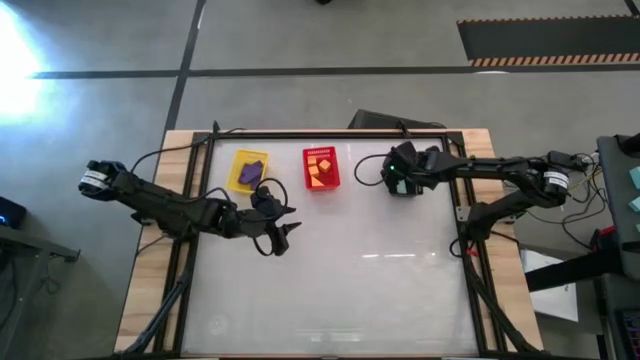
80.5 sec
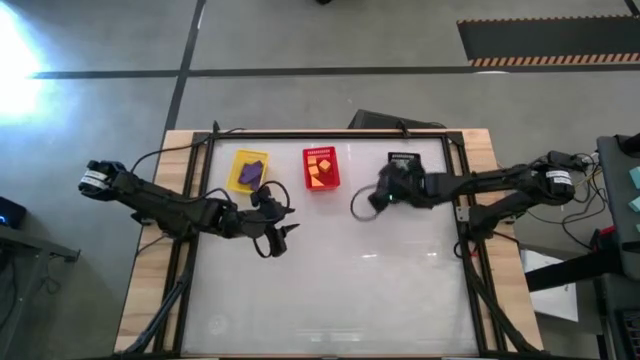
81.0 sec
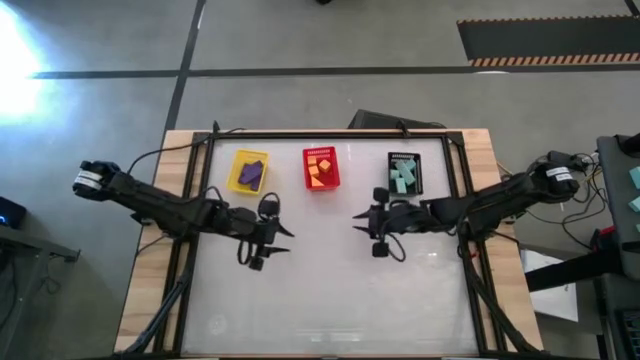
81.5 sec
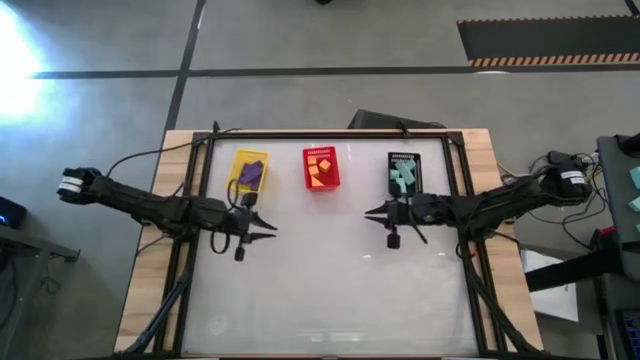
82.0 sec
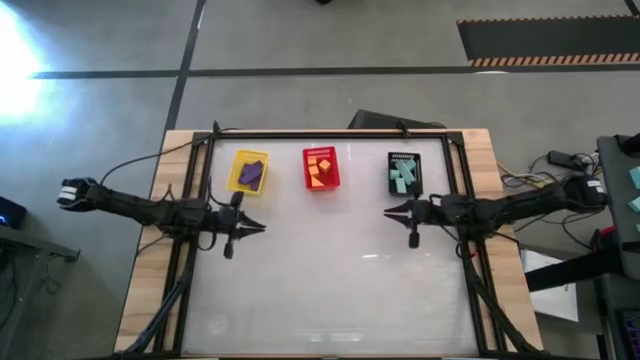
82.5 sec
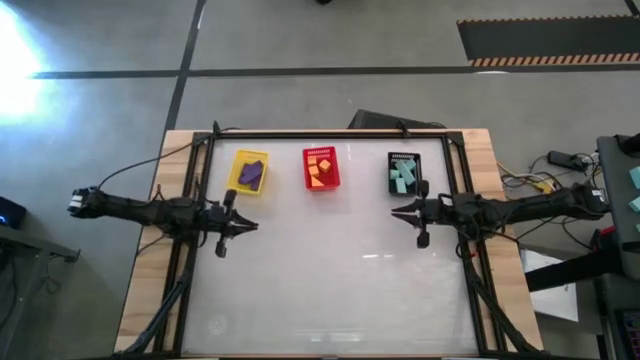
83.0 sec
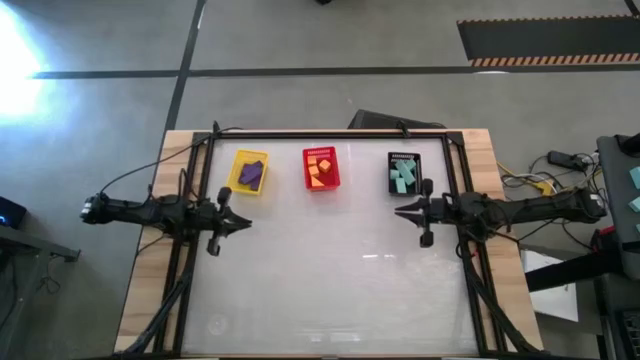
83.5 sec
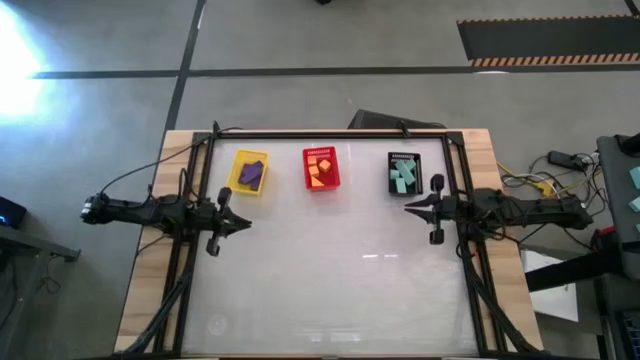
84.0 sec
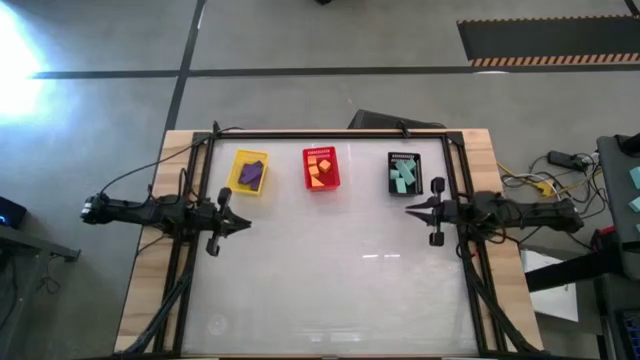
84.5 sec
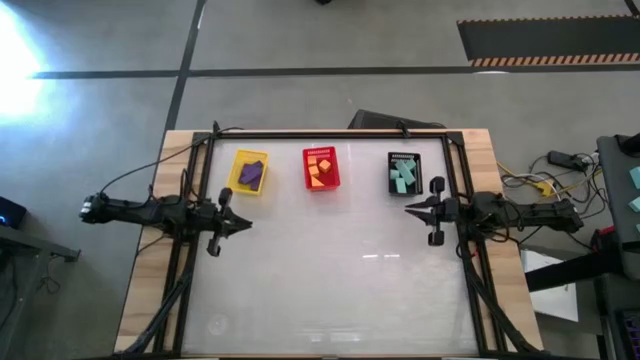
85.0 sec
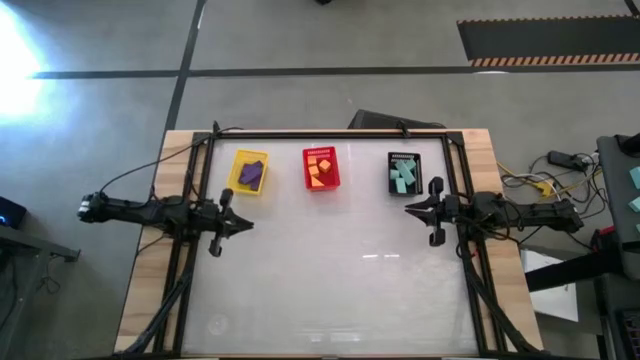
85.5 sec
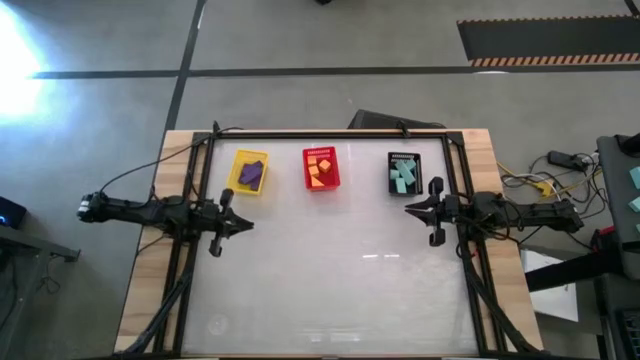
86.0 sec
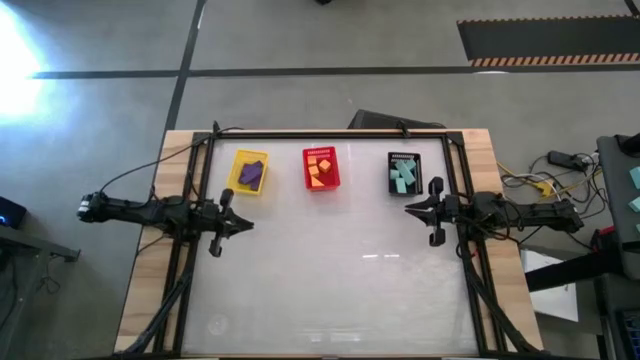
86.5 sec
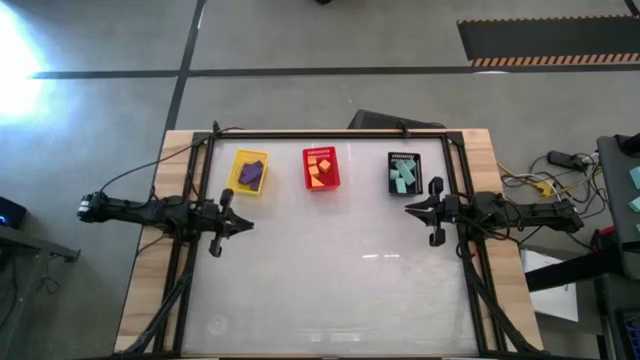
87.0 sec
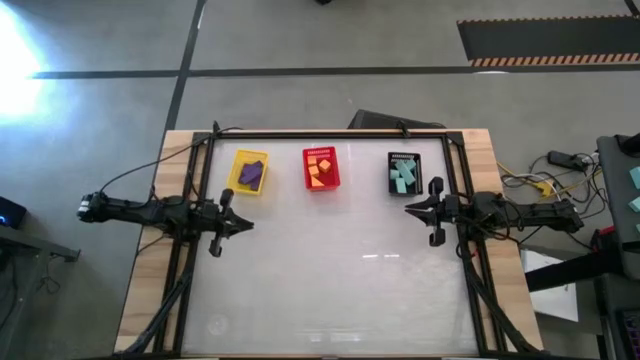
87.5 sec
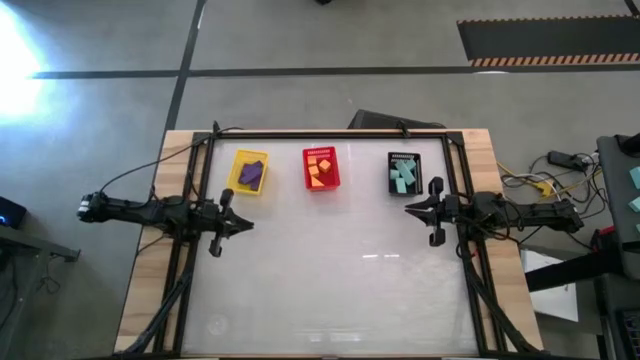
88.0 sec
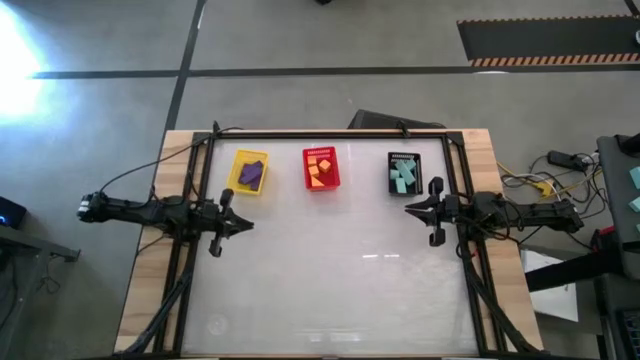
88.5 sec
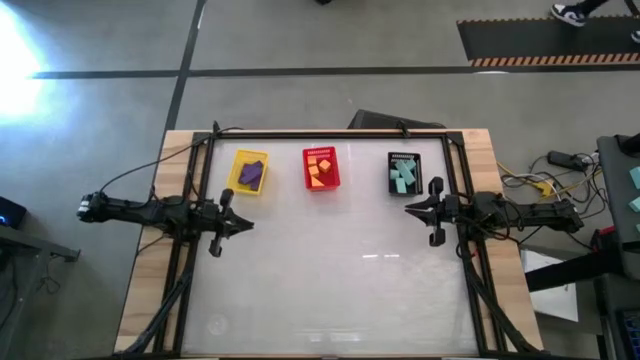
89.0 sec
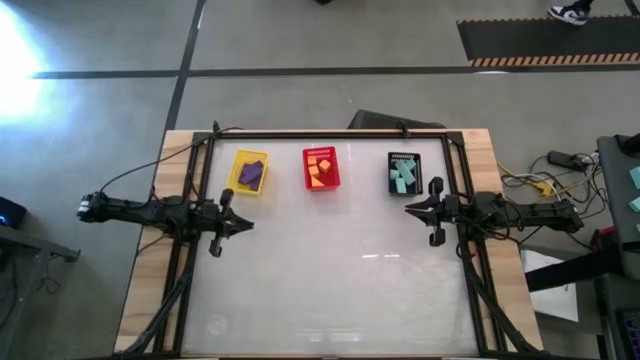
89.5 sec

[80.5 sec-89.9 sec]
Task: Sort & place blocks by color
Return to Home Position

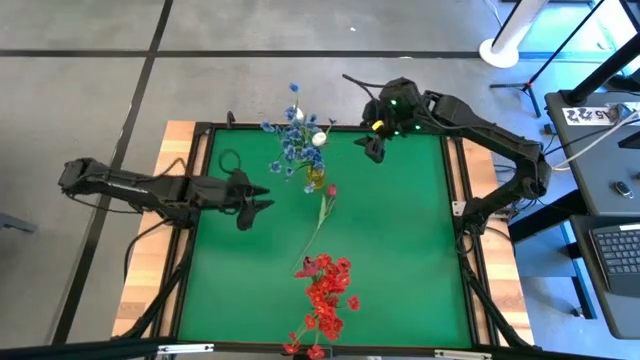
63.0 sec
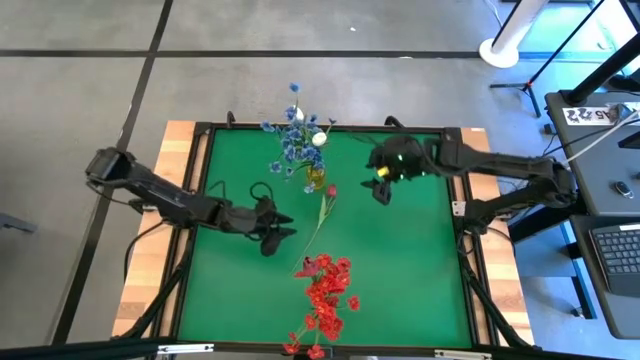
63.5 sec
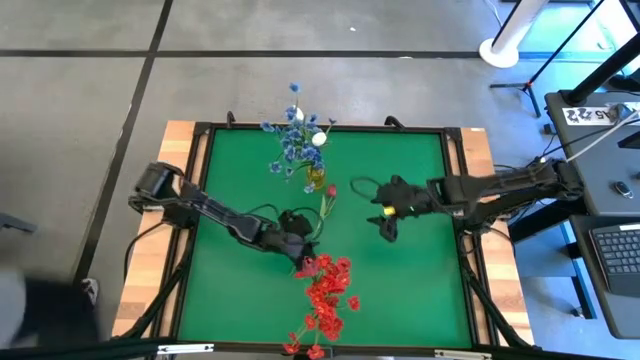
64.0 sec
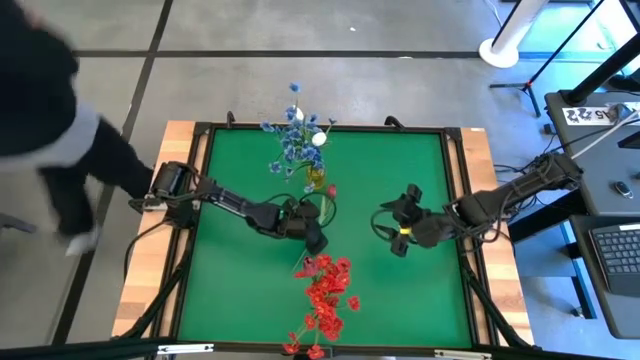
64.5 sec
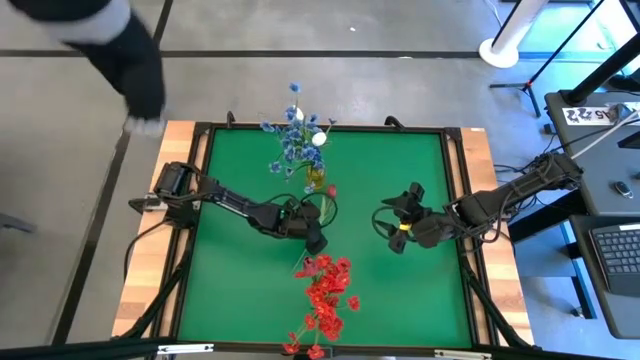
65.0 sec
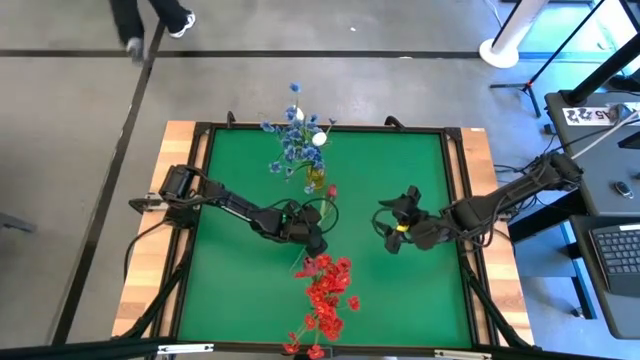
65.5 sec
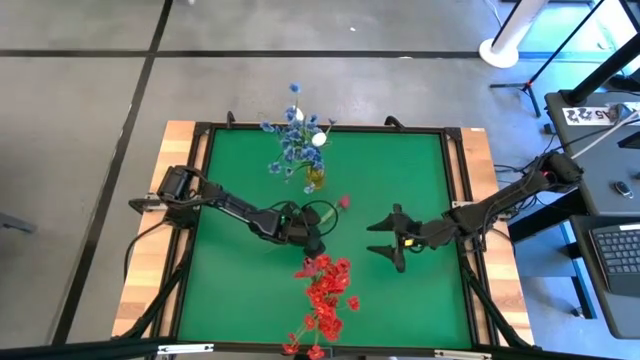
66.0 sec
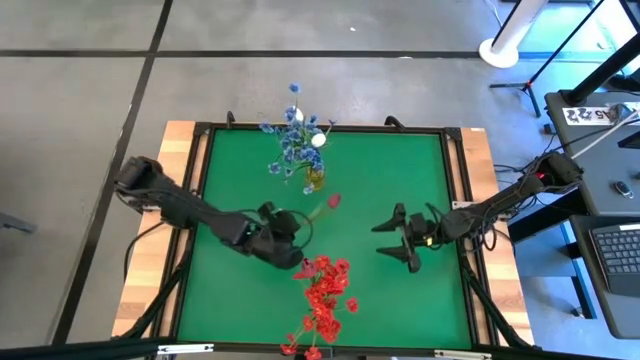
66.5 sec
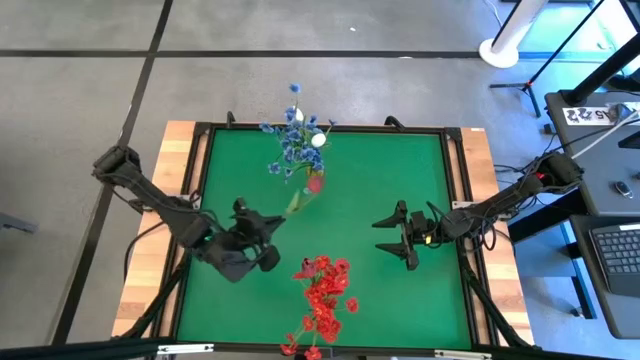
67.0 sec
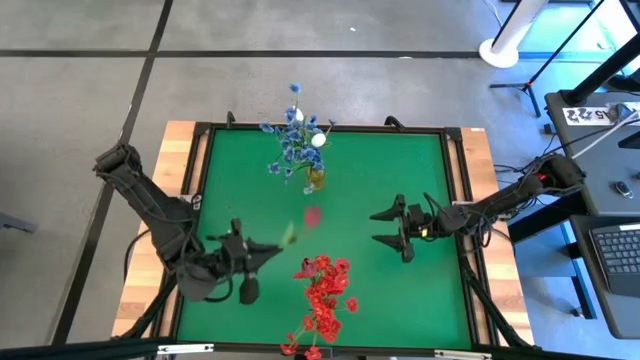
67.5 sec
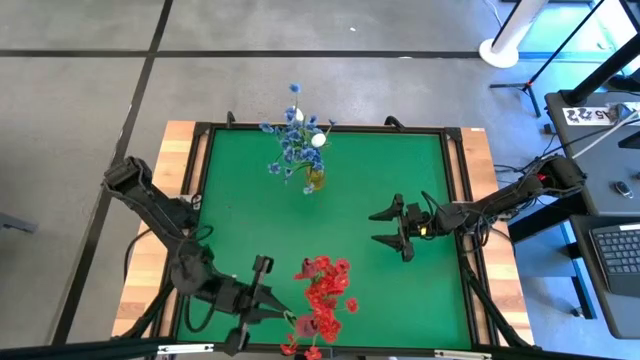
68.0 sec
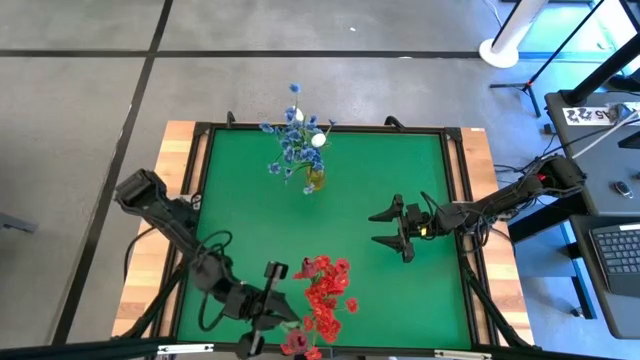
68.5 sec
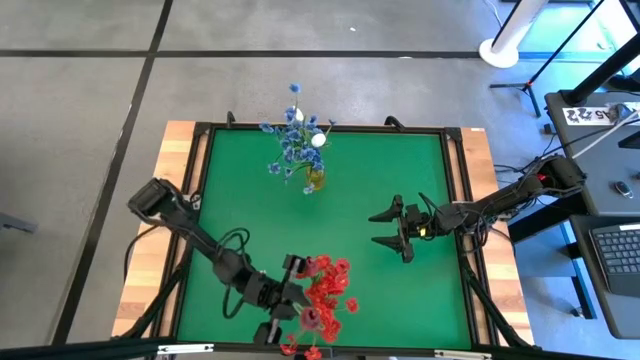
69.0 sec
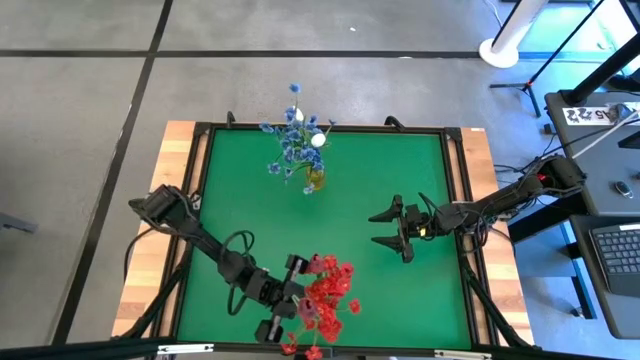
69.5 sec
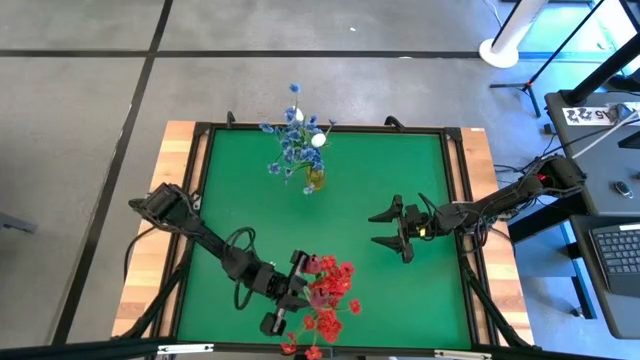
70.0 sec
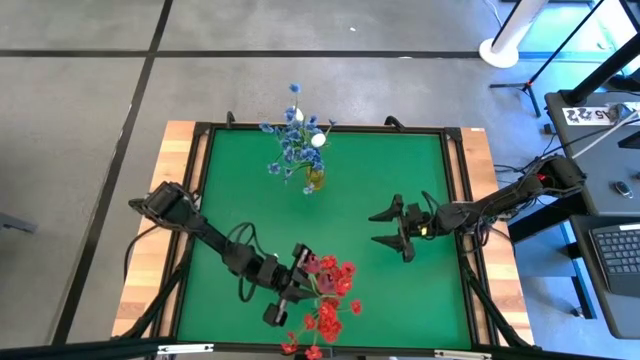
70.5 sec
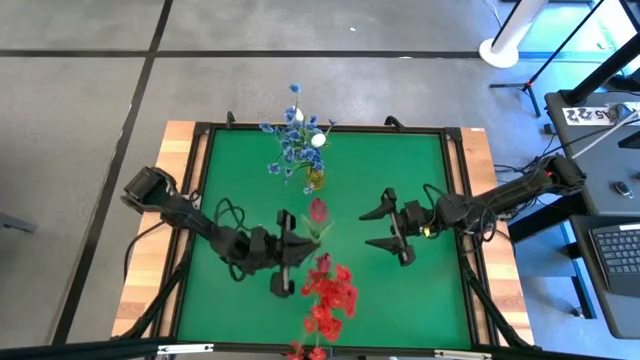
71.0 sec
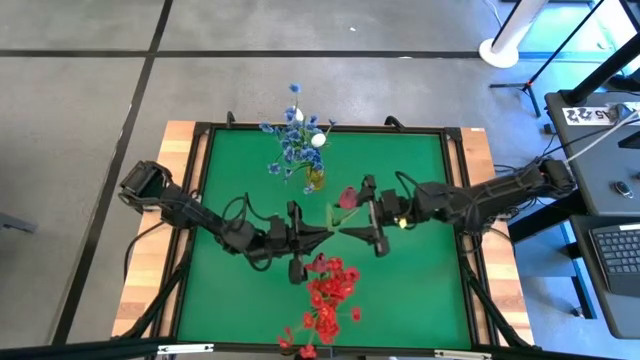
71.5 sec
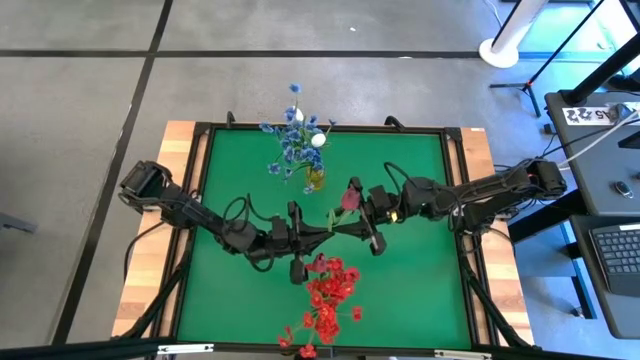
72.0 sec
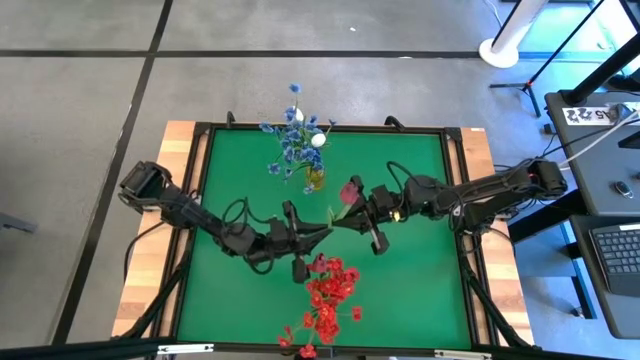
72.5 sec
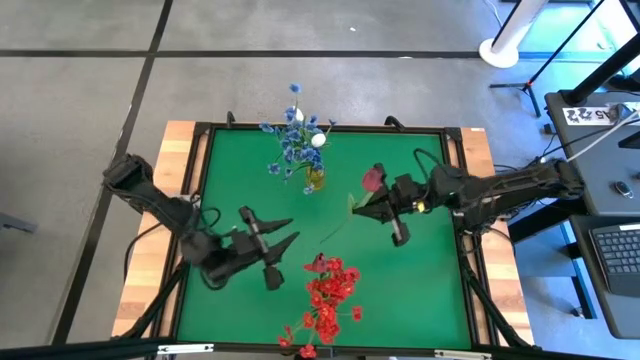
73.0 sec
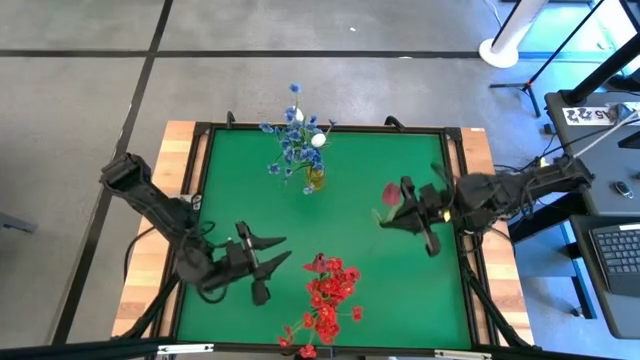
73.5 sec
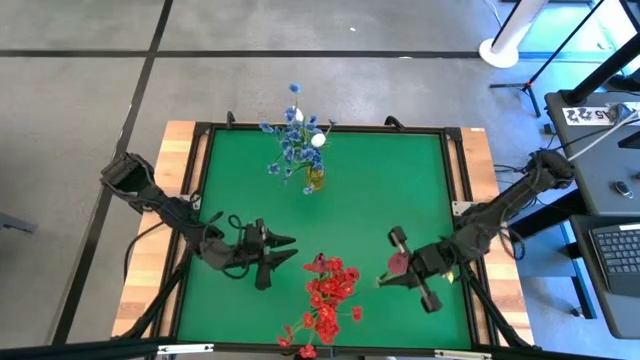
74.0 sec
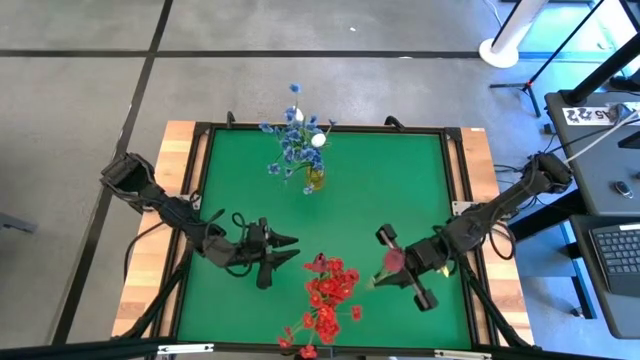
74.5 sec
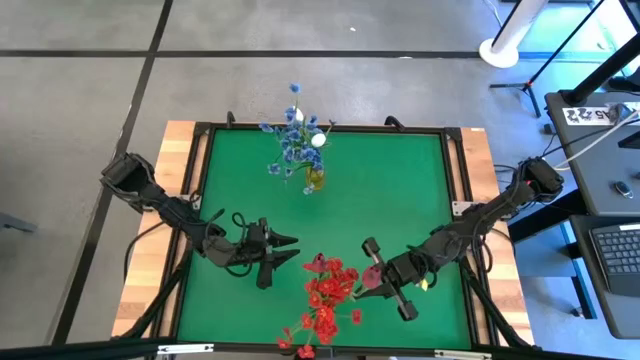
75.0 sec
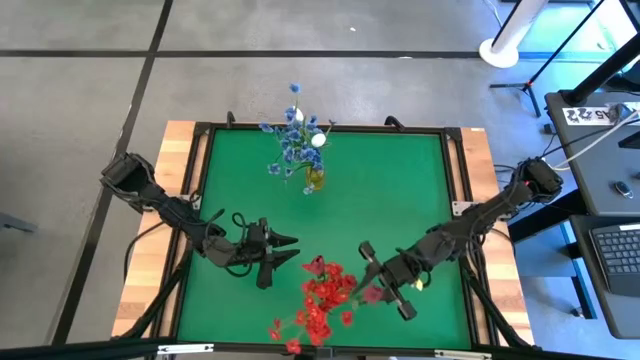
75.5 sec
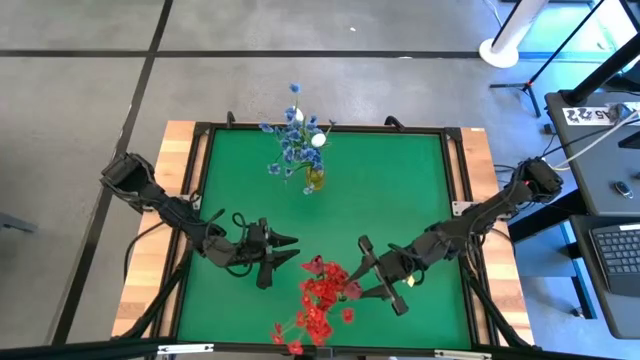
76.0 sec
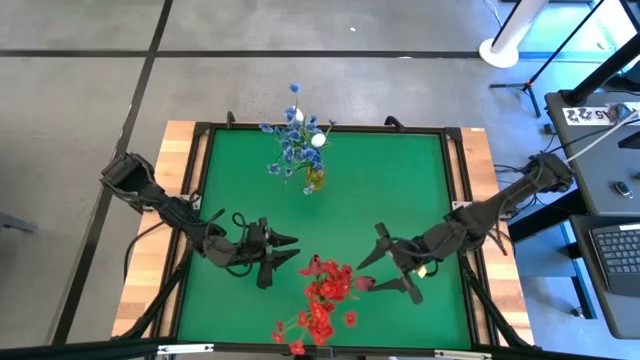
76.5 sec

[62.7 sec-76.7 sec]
Task: Sort flowers into vase by color
Put the red flower into the transparent vase
